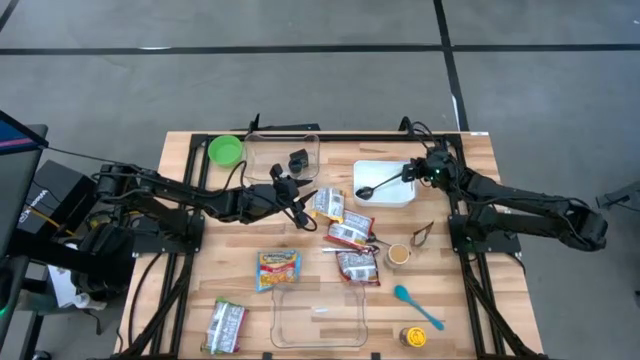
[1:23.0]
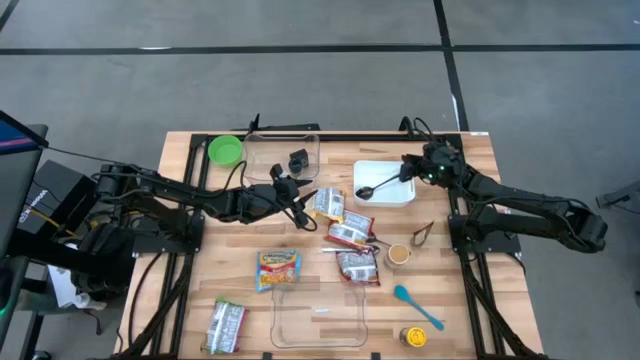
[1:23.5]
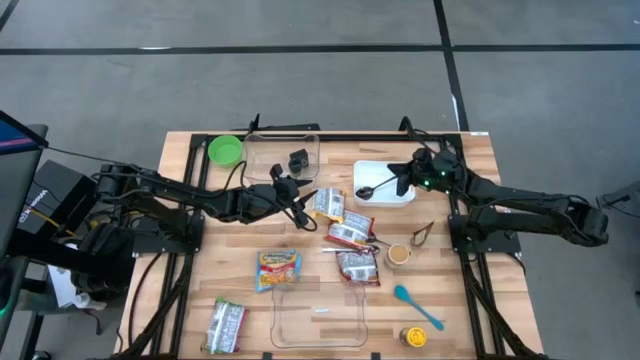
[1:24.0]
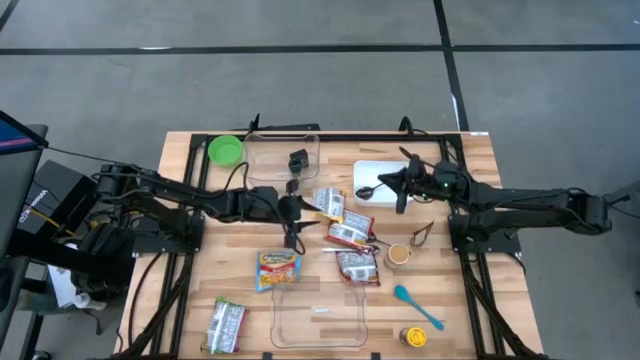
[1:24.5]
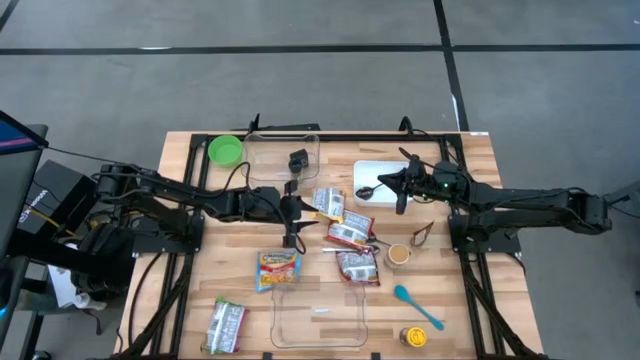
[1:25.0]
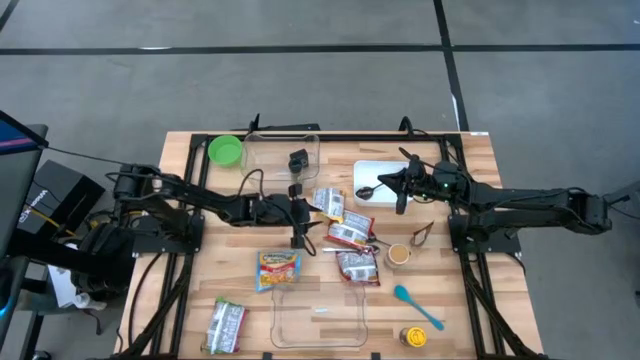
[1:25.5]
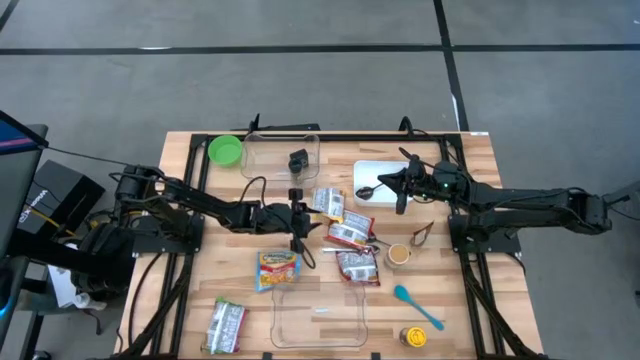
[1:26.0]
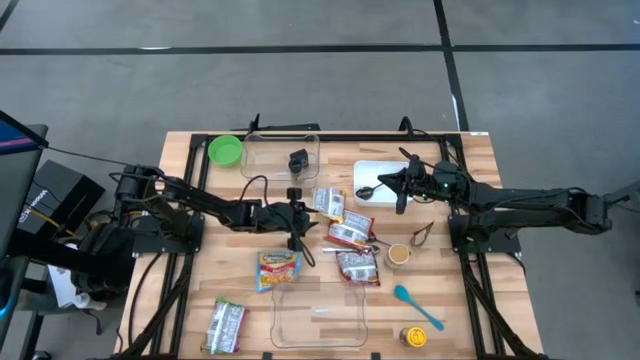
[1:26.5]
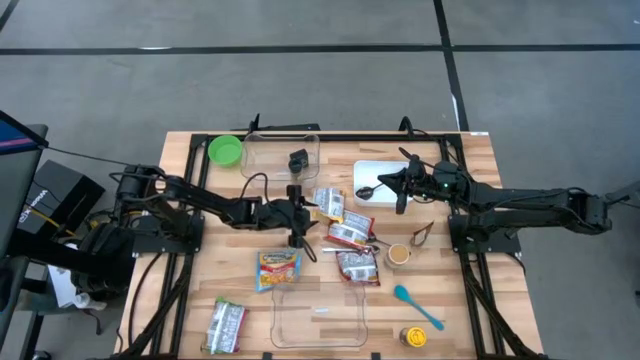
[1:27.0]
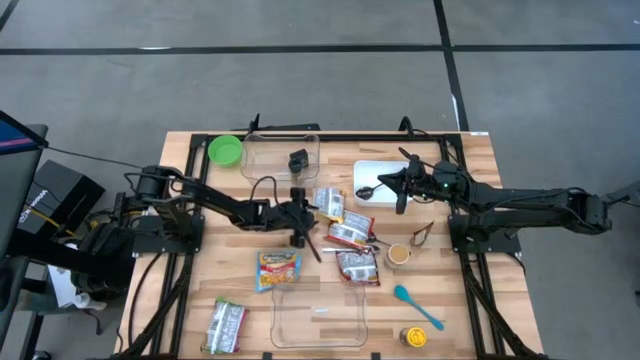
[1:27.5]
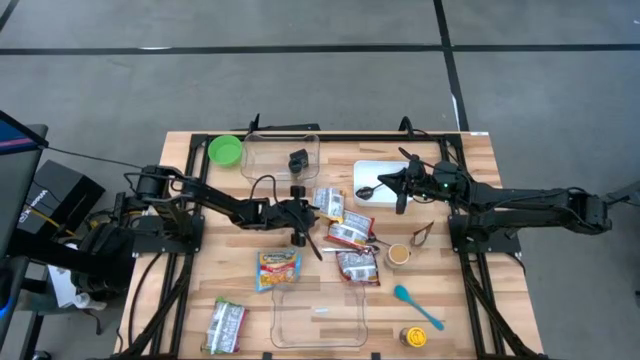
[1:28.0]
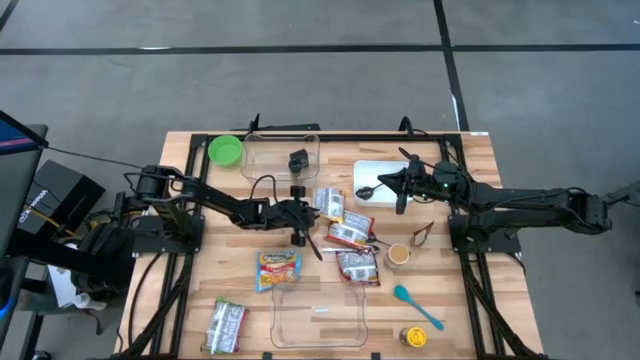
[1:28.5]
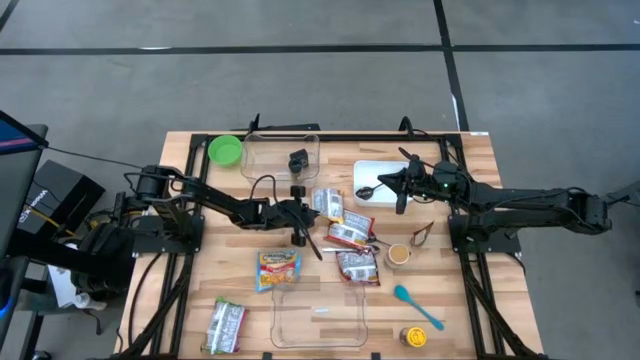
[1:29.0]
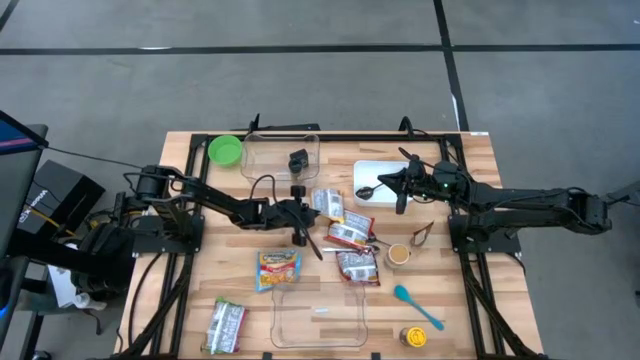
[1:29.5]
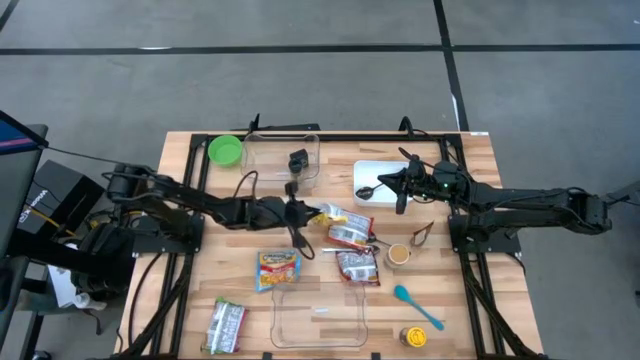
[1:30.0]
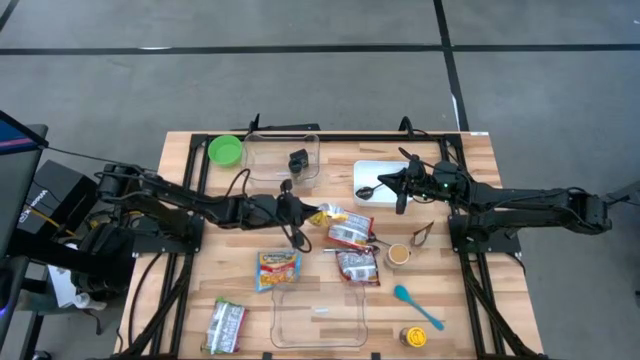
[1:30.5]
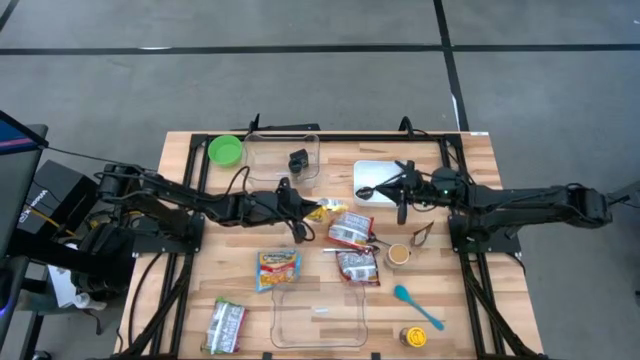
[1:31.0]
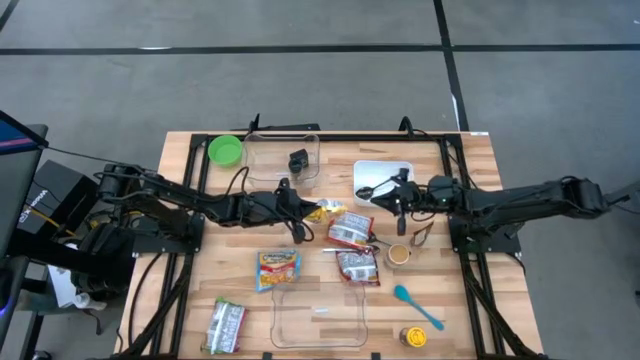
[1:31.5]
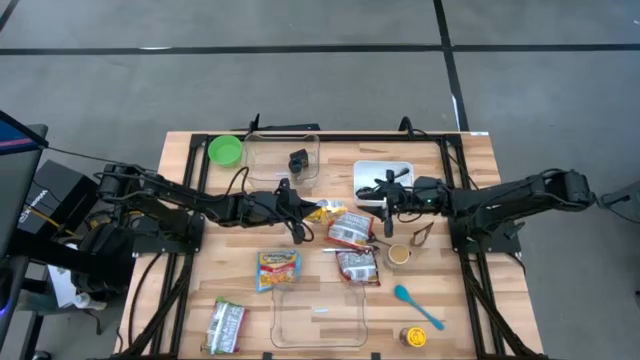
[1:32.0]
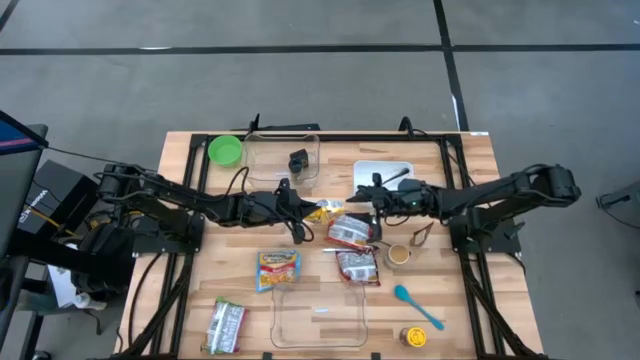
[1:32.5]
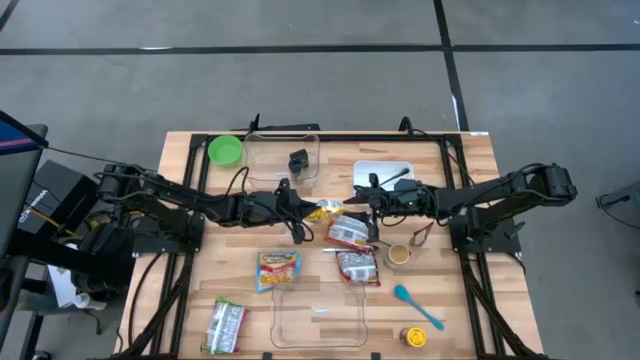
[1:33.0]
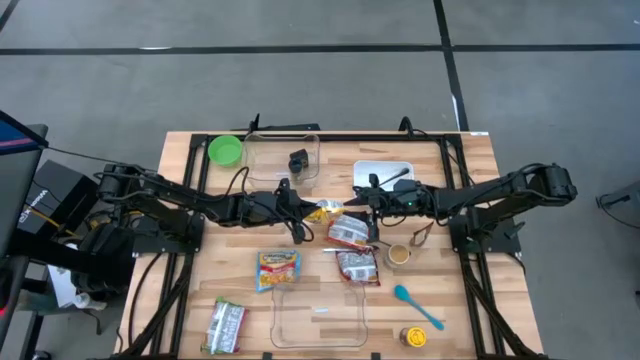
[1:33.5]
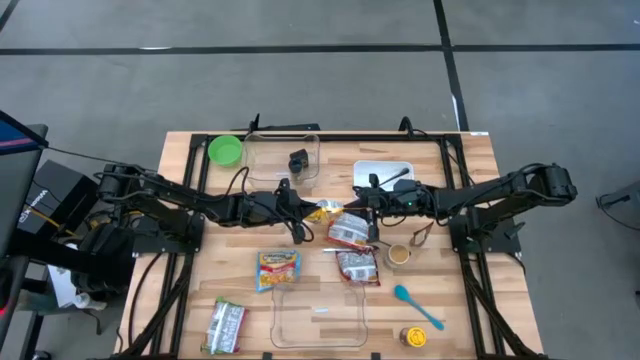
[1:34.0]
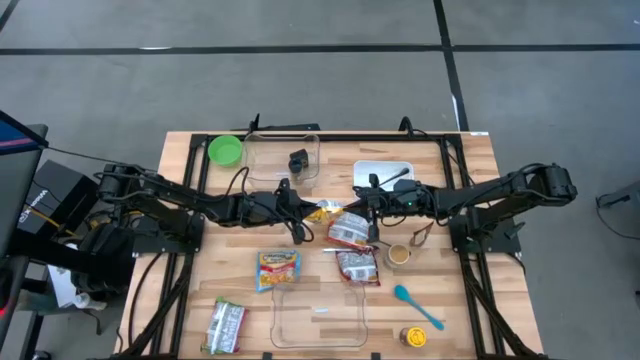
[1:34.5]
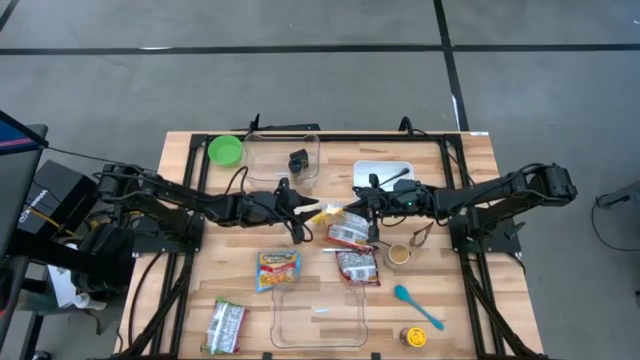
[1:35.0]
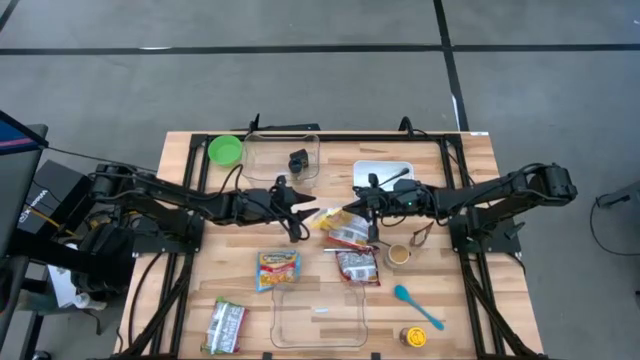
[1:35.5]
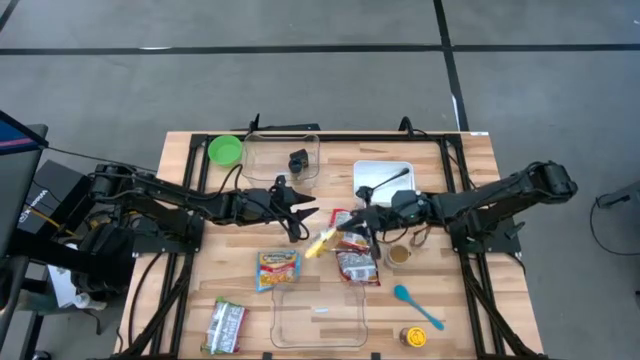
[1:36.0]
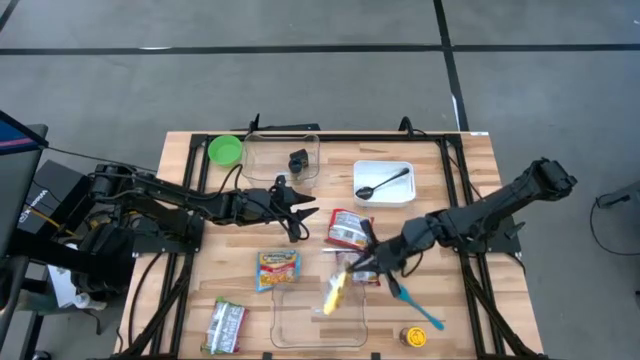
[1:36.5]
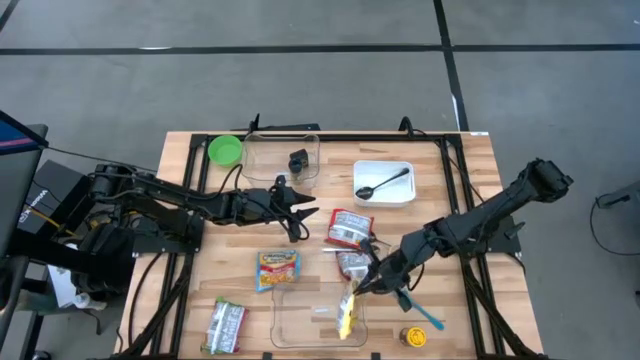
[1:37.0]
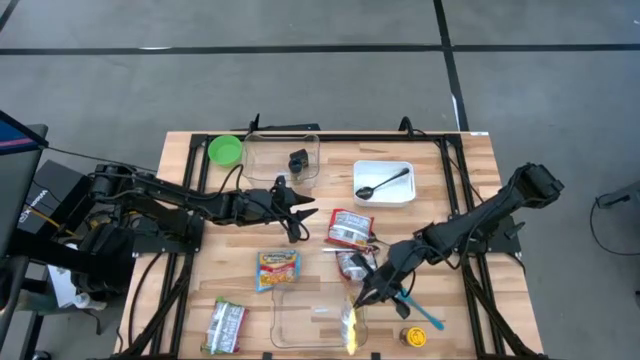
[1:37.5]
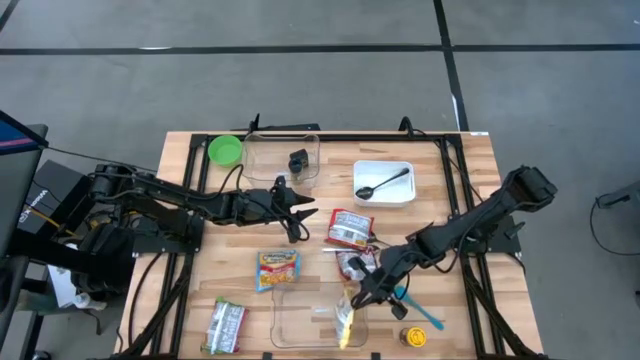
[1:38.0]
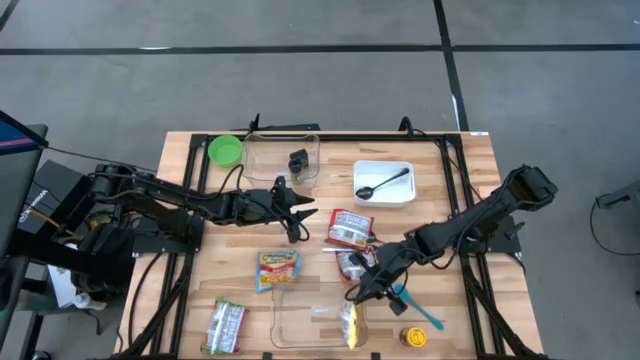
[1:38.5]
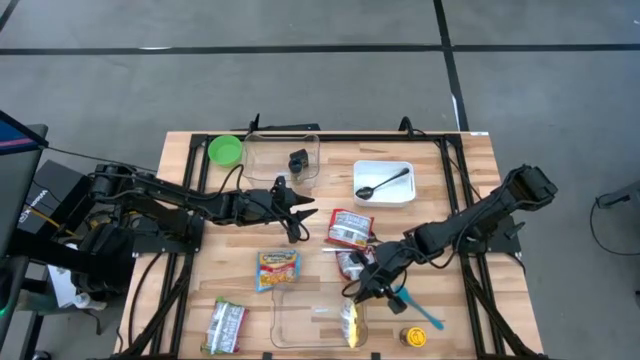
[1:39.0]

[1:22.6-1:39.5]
Task: Pick & Place Food Item
Put the yellow noodle pack into the bottom transparent bin

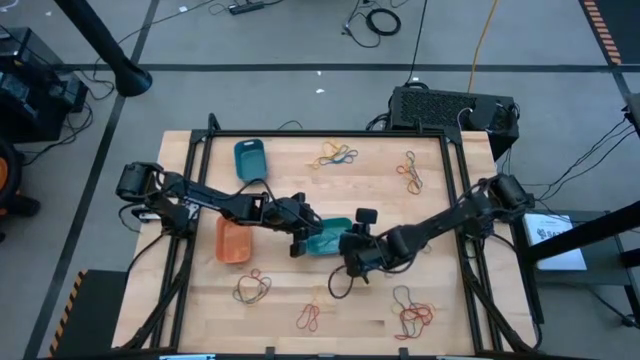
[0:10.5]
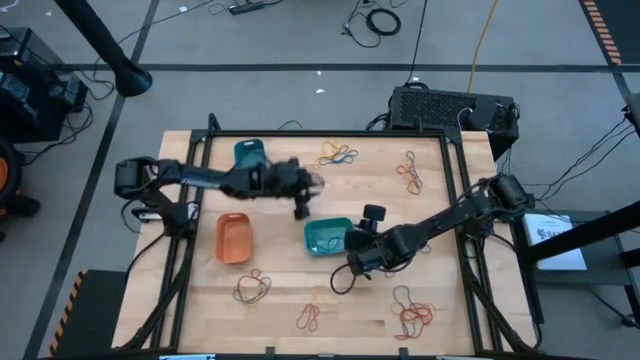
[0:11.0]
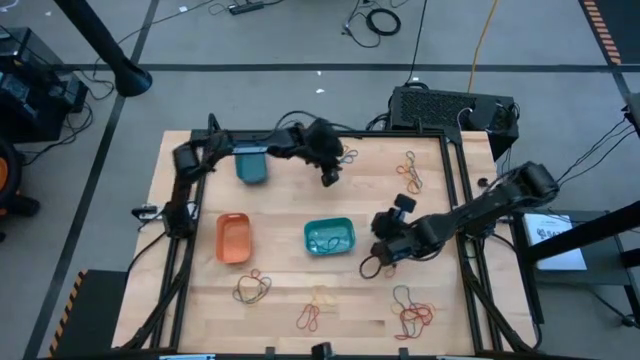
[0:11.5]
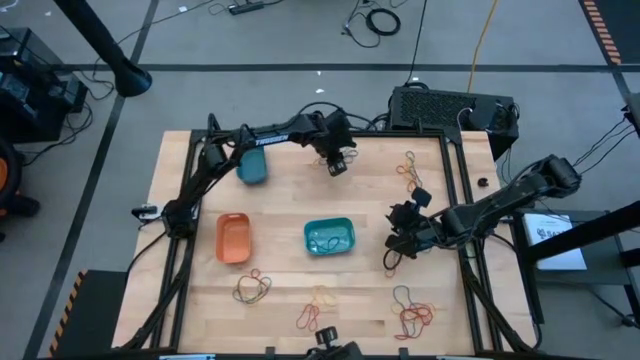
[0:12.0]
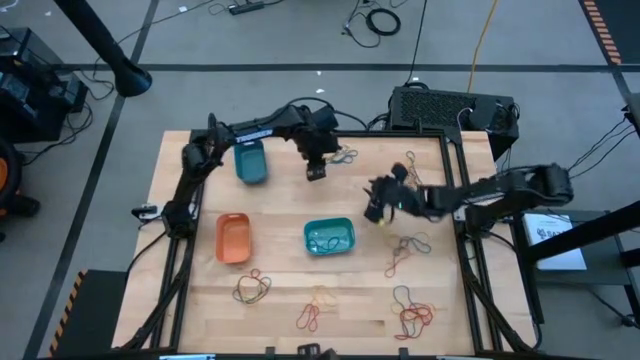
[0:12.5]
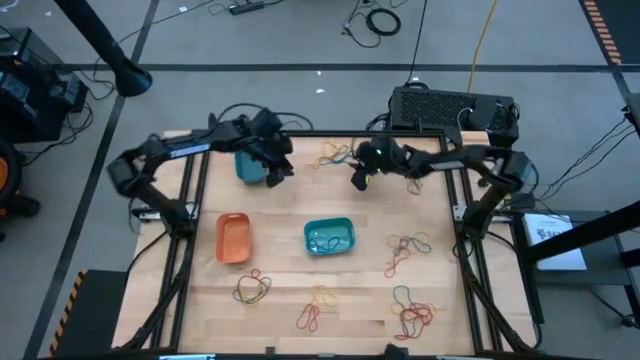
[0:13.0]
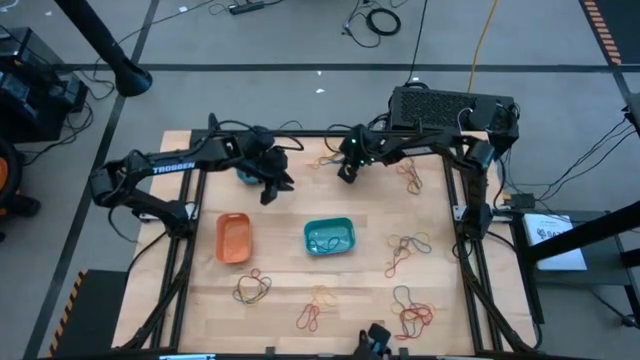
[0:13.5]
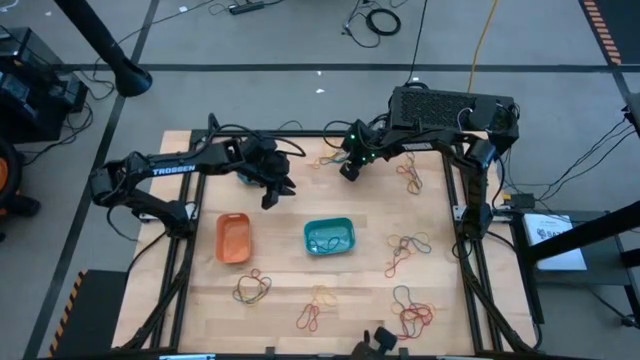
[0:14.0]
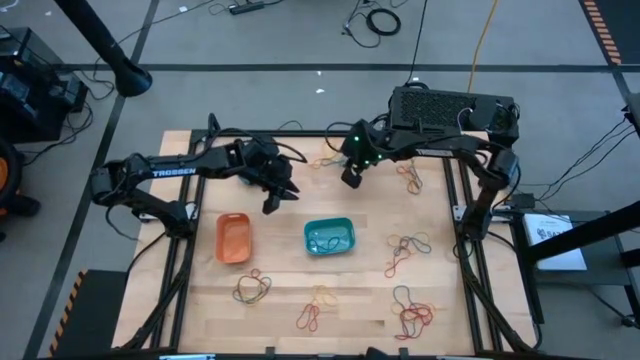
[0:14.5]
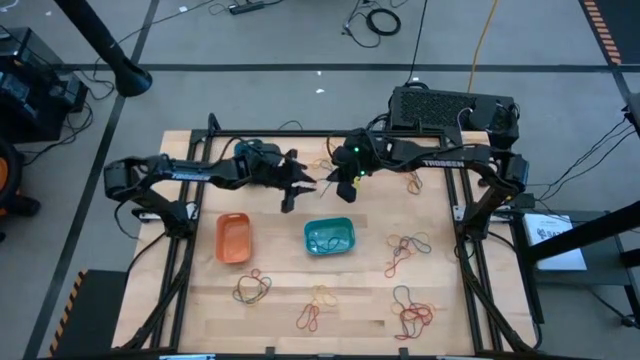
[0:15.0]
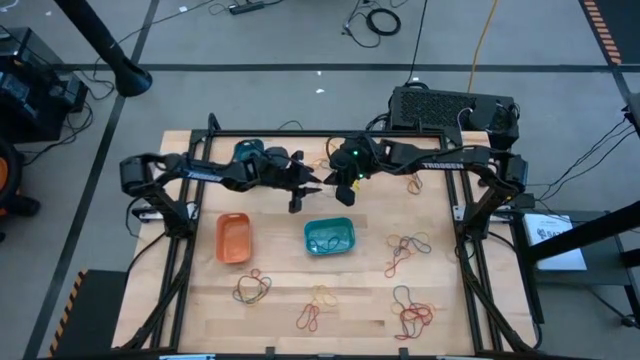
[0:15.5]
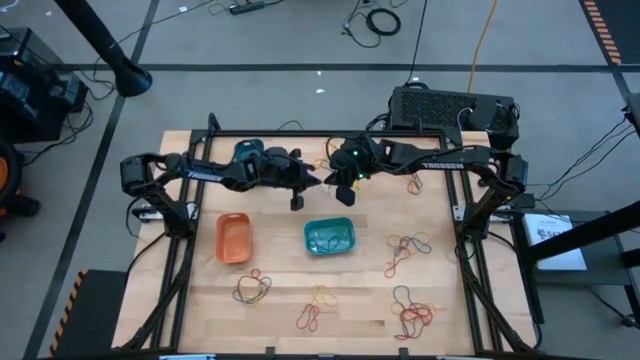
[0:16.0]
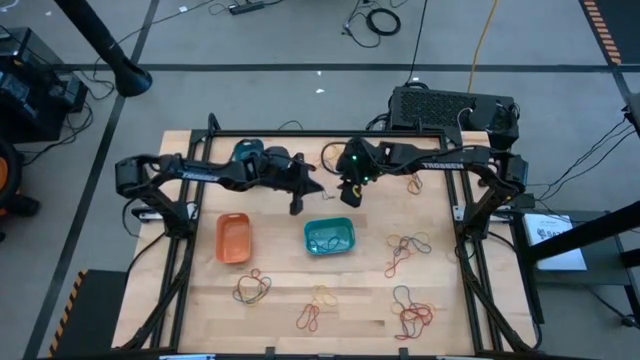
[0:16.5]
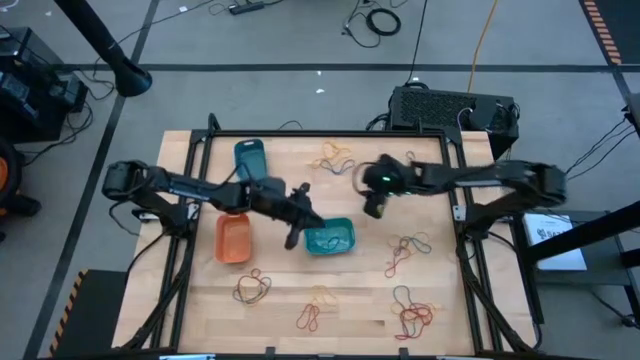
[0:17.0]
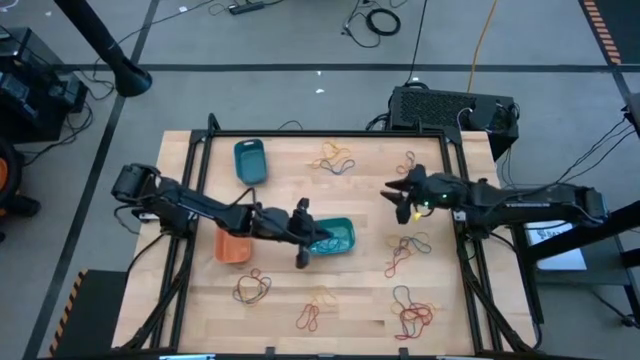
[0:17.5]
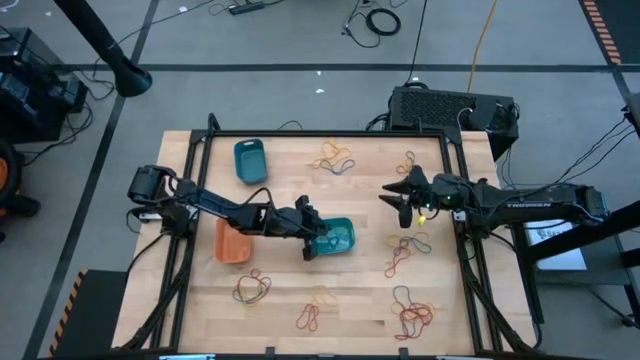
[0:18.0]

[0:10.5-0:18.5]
Task: Sort rubber bands into baskets
Put the blue rubber band into the green bin
